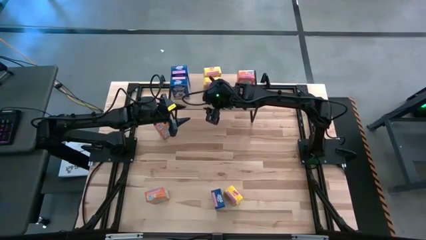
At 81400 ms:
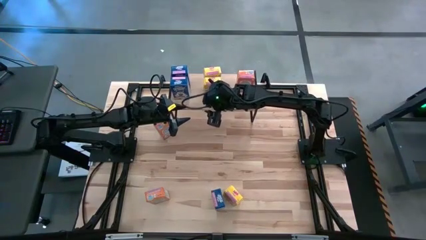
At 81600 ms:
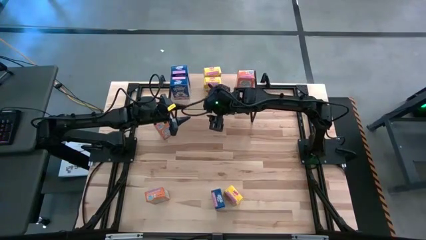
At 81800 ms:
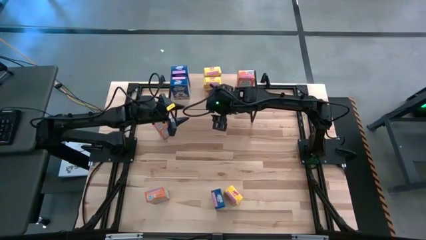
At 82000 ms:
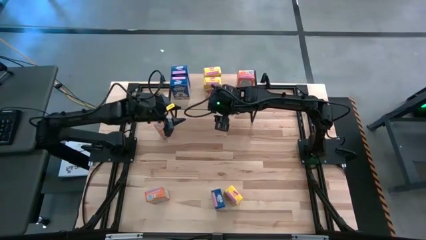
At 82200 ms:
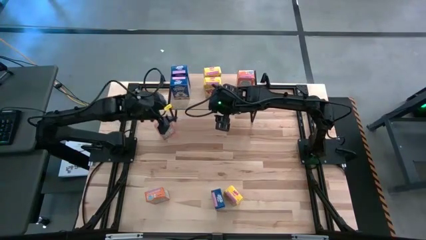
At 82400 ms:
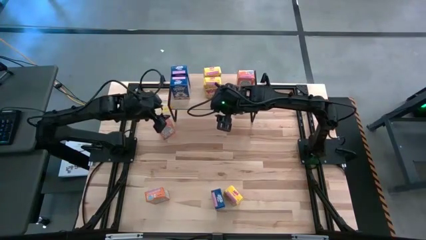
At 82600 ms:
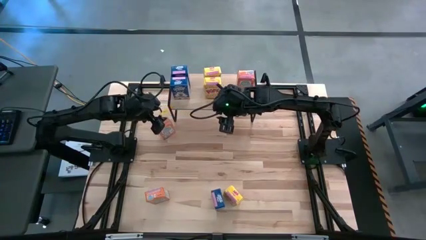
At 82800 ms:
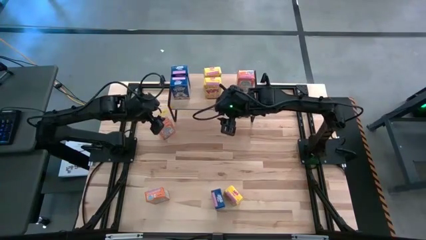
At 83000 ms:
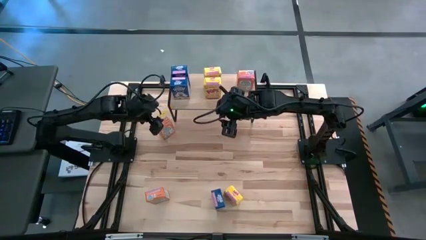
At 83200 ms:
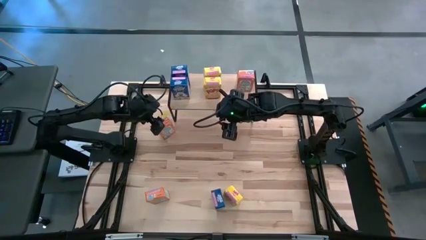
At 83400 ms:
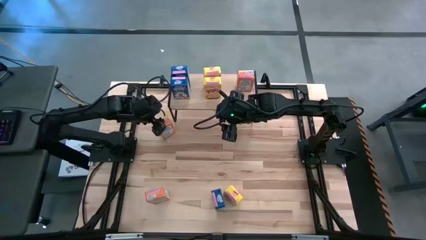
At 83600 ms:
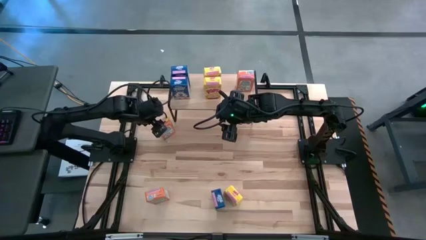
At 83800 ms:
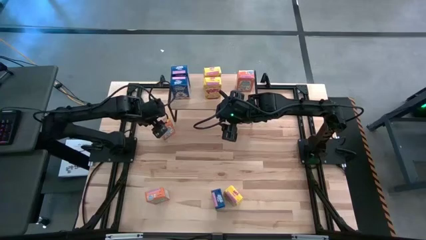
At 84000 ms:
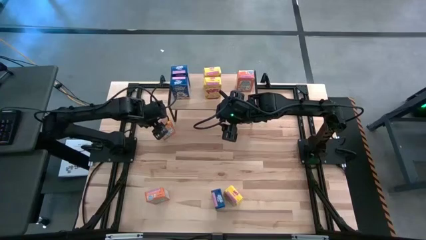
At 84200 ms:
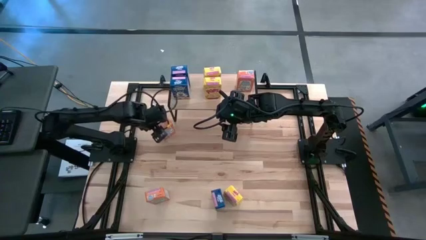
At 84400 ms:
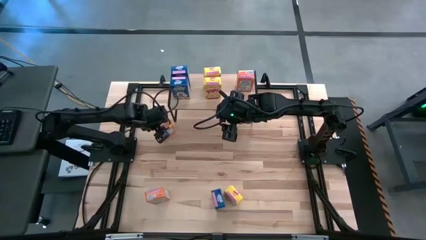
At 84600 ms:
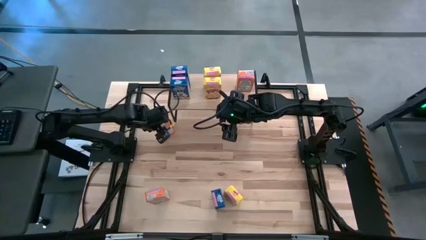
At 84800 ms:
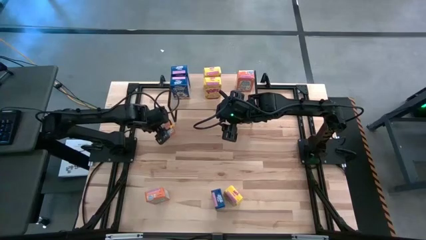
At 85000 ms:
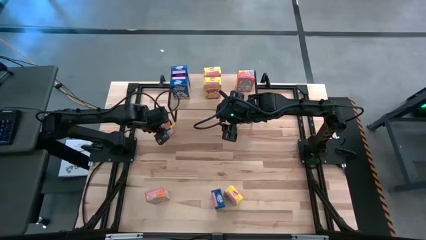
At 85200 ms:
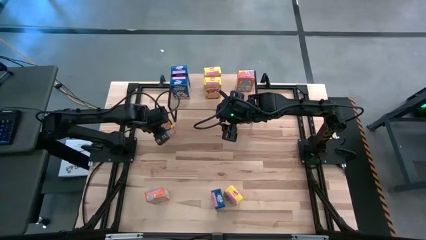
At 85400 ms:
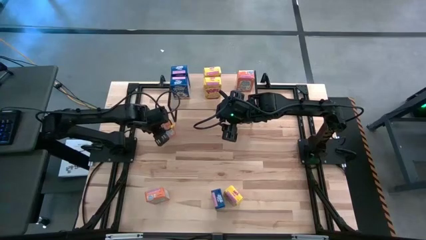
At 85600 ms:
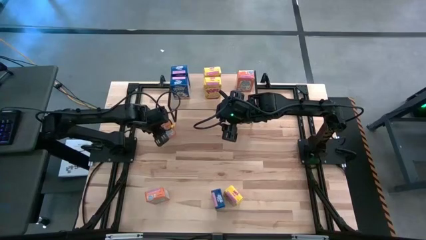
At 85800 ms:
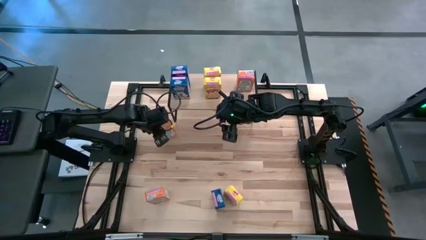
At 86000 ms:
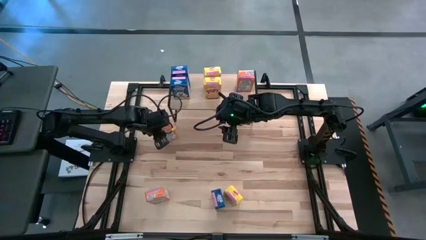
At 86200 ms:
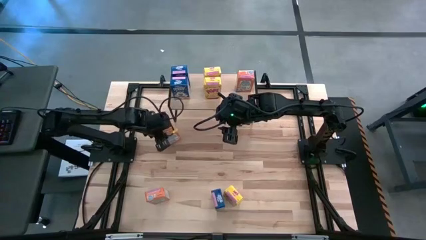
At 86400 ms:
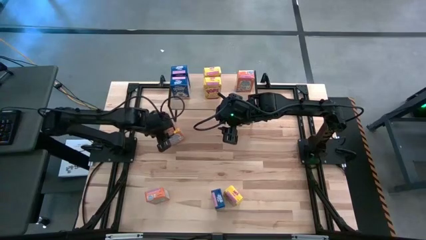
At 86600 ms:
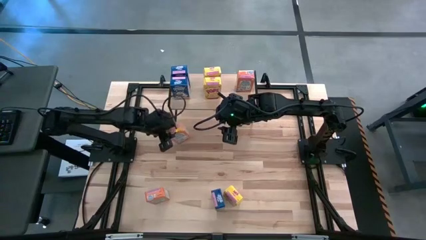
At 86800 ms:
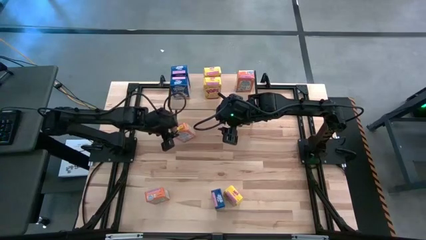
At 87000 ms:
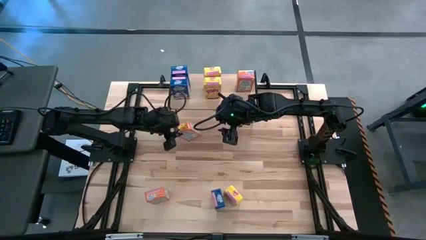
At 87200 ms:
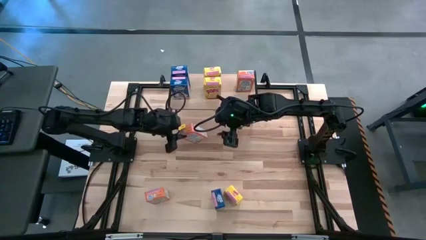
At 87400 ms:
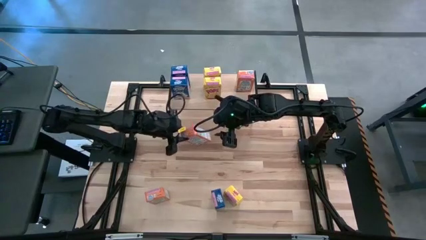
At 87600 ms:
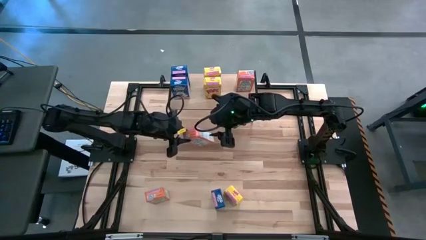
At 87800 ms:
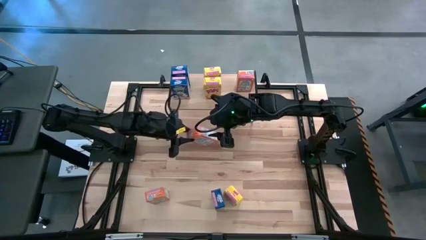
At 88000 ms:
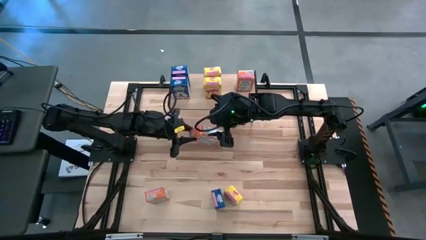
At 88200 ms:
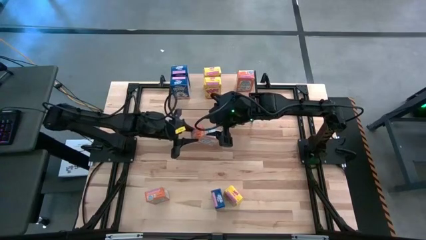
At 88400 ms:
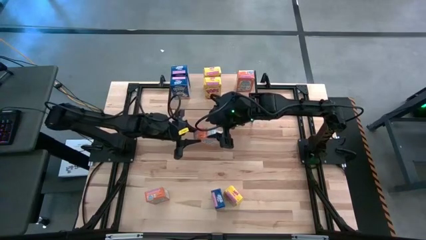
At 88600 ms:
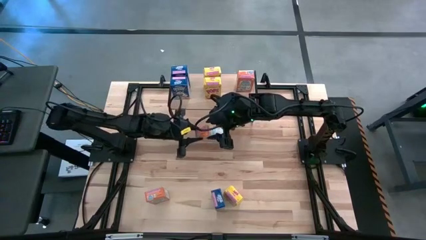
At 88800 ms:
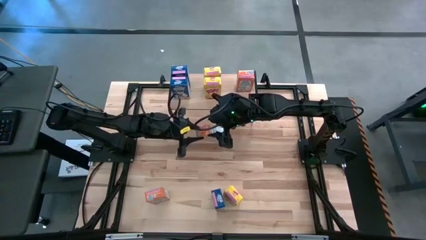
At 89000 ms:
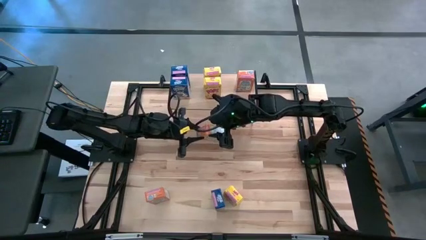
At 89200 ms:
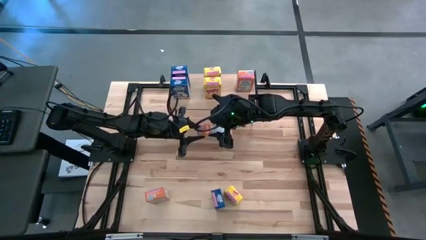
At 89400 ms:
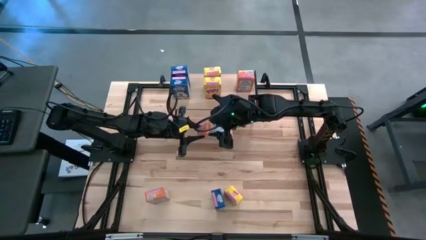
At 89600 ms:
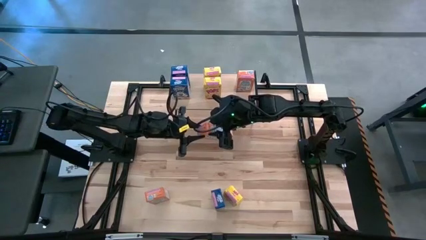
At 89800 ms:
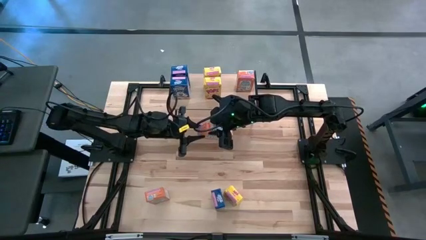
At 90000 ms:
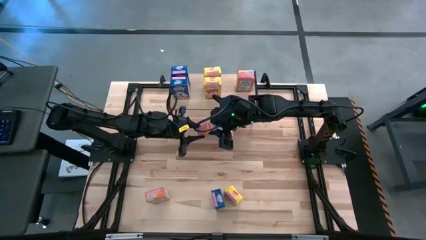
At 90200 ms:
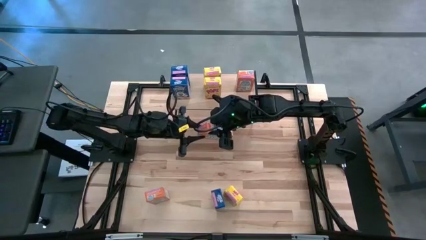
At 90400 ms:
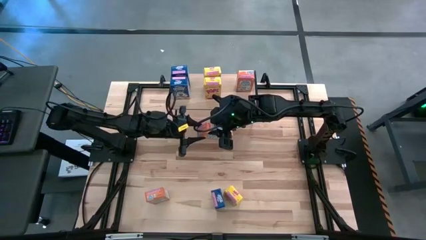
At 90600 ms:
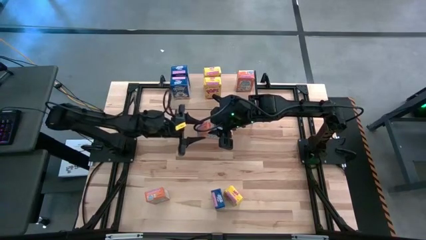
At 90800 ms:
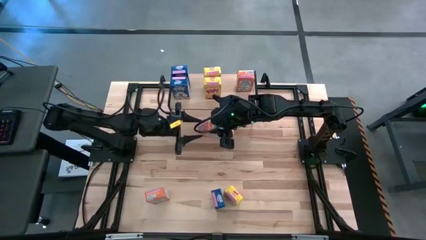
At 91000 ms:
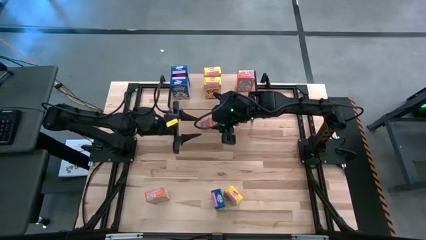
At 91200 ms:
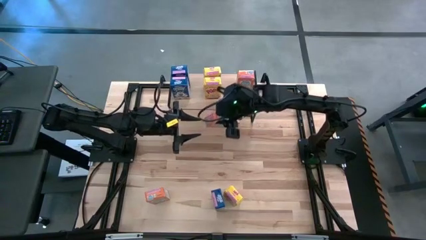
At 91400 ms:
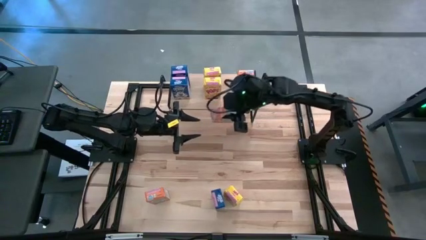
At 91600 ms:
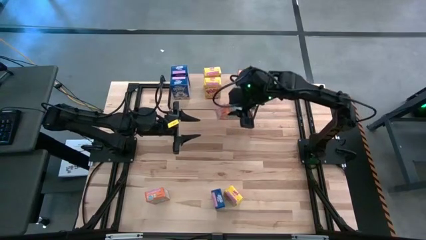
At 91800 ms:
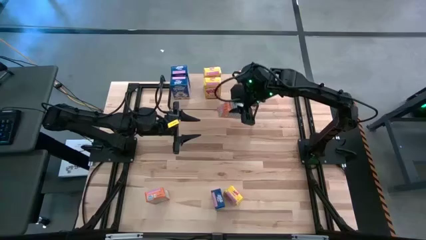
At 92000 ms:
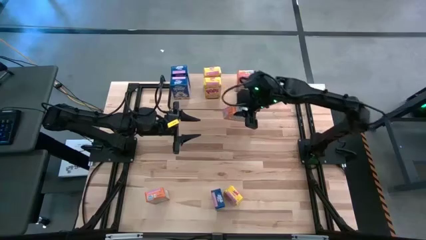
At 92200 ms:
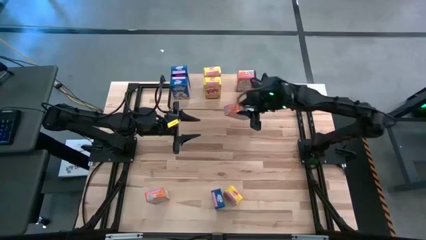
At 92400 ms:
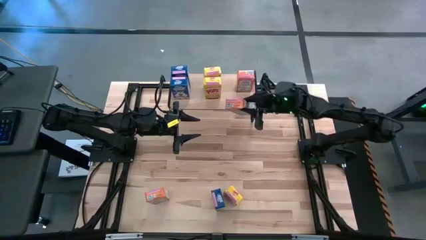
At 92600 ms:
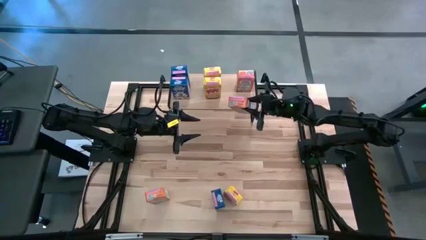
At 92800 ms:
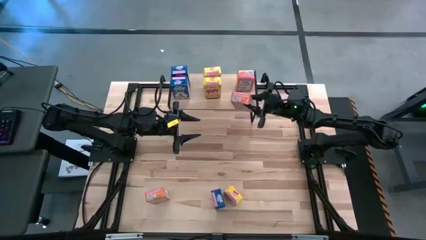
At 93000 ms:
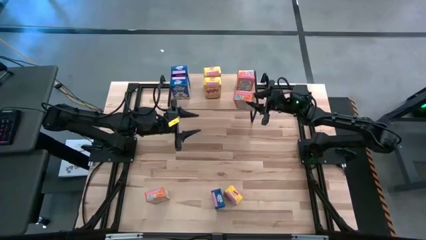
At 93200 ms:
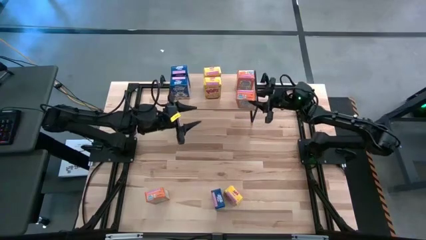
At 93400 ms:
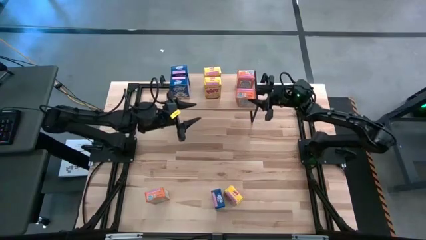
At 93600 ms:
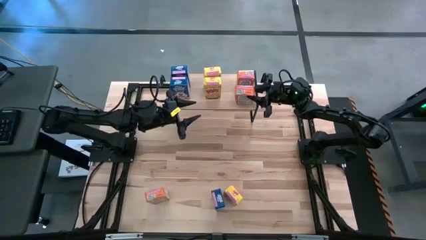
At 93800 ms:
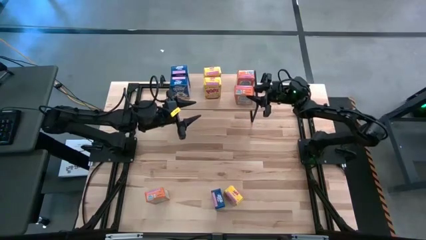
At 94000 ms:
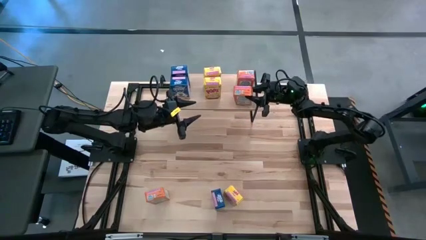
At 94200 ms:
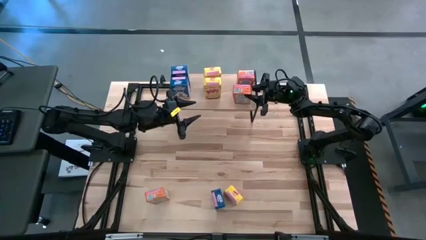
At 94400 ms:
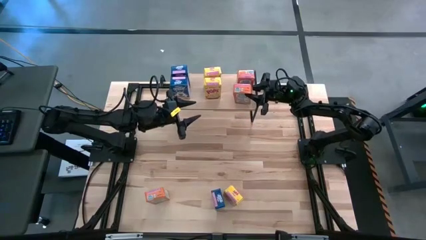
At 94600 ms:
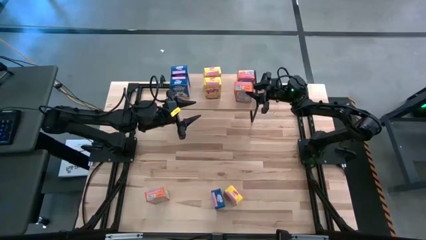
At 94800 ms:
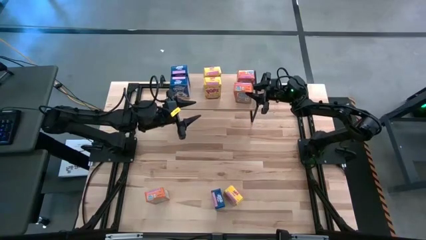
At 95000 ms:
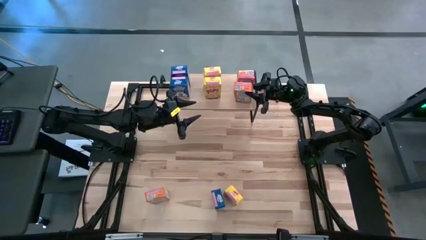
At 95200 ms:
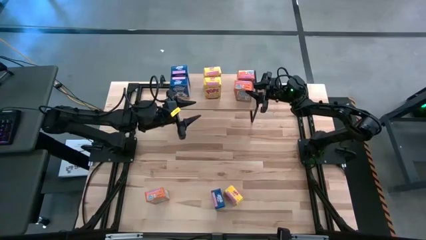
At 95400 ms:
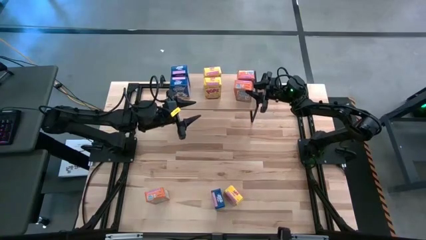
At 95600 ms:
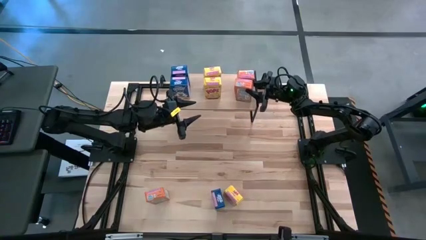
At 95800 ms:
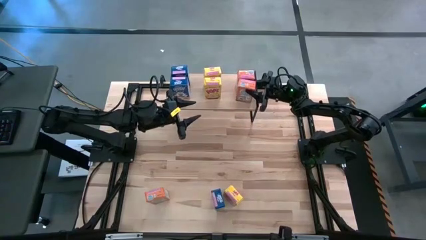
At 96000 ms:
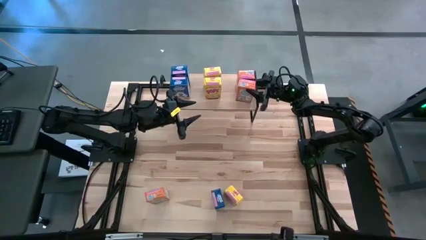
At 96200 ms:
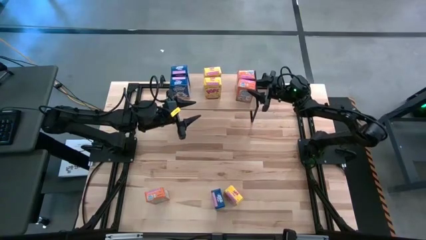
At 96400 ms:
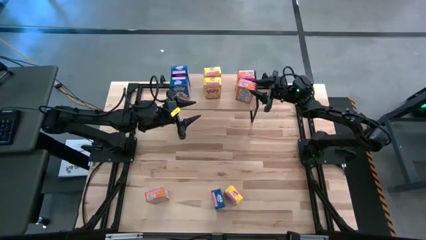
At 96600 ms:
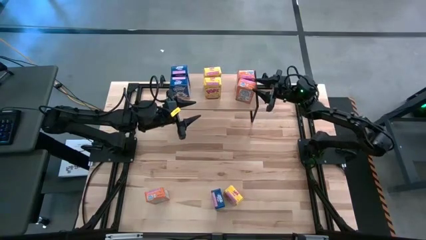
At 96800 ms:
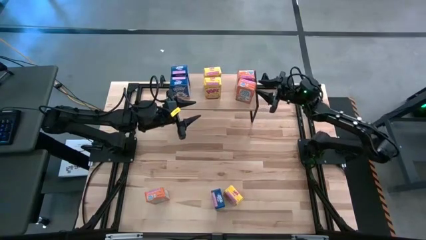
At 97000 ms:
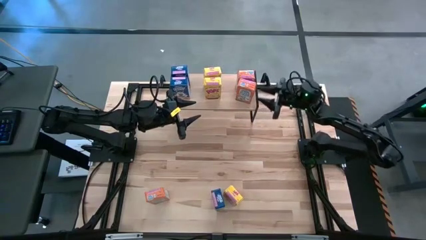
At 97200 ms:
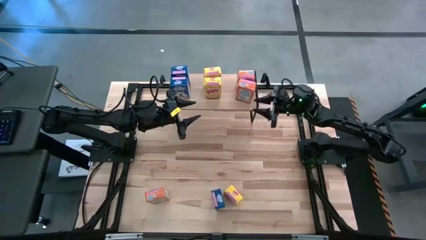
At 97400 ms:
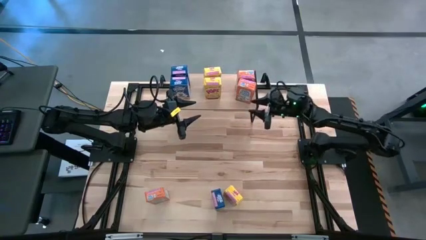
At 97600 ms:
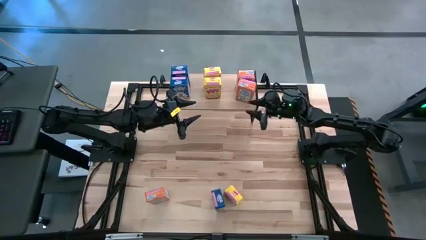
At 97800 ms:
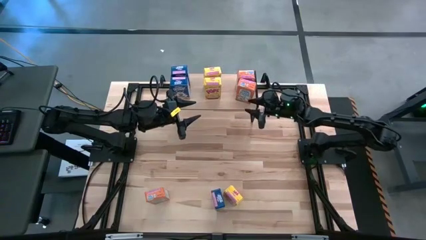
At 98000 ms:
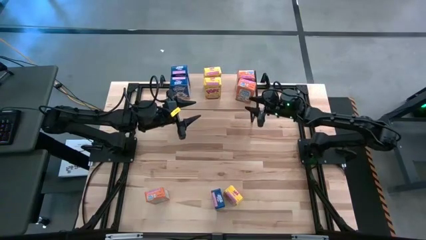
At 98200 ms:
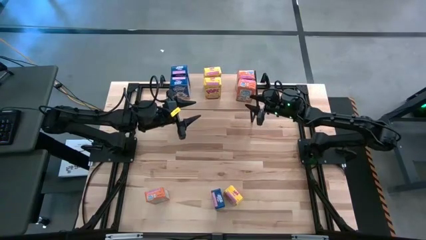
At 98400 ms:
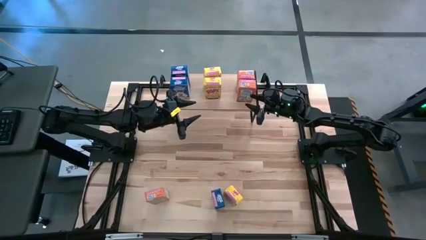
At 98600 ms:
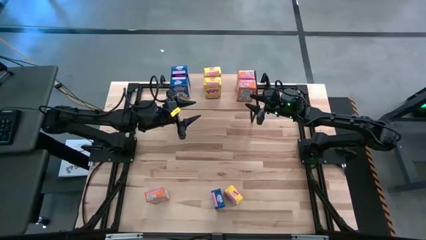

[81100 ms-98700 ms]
Task: Stack cereal on shelf
Put the top orange cereal box on the shelf
